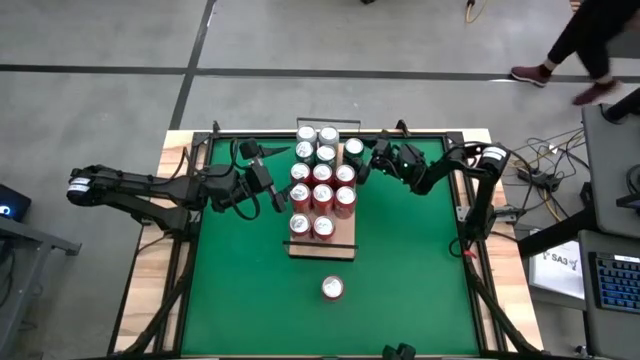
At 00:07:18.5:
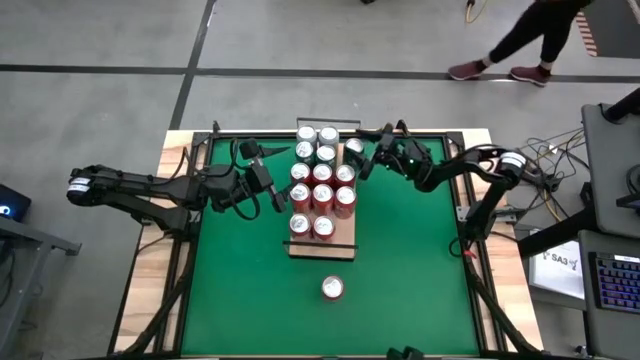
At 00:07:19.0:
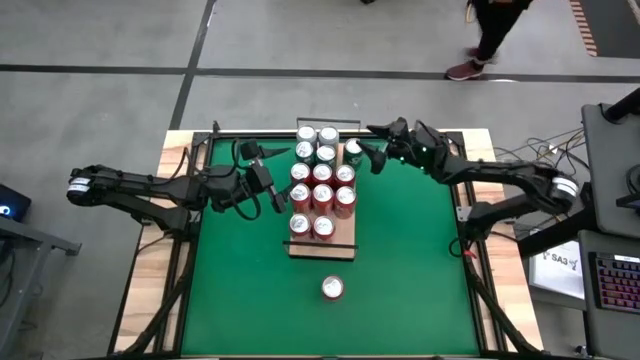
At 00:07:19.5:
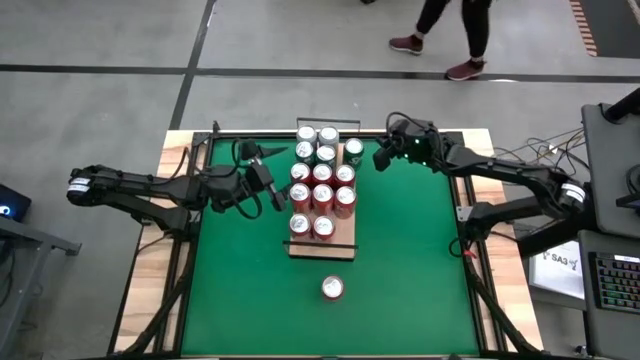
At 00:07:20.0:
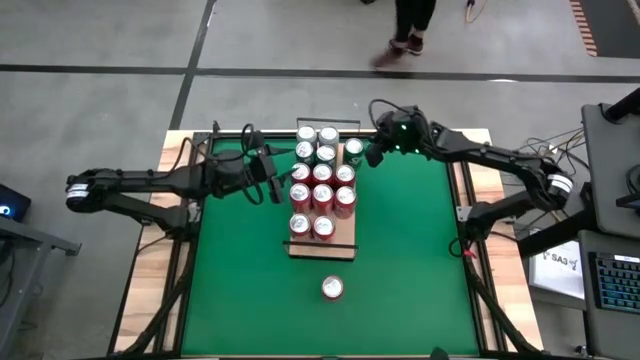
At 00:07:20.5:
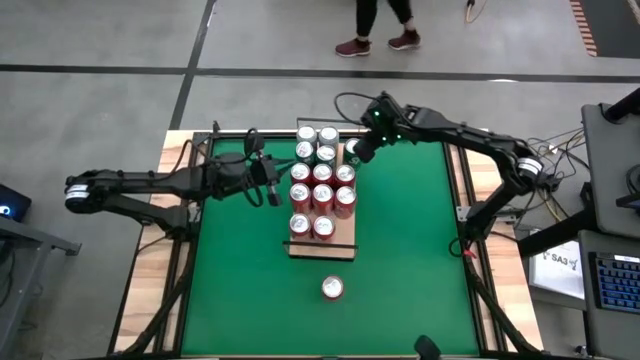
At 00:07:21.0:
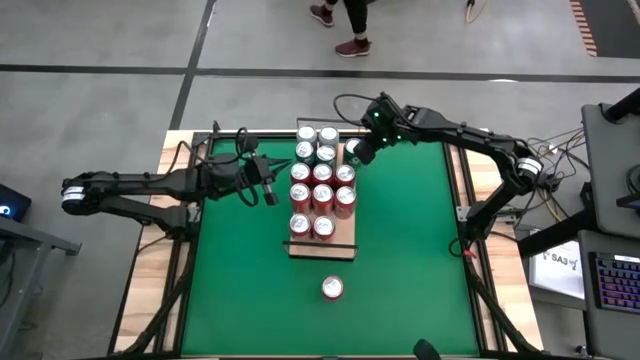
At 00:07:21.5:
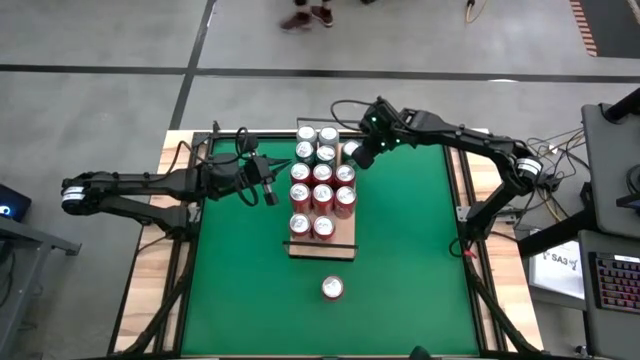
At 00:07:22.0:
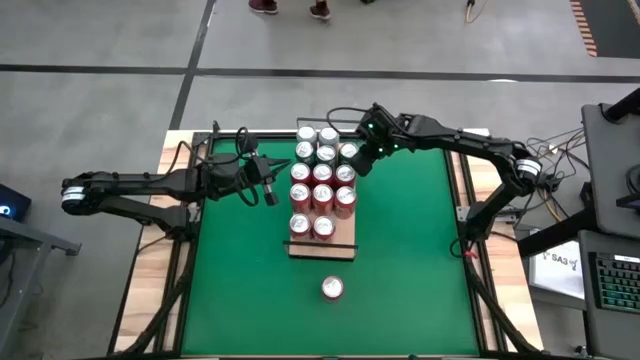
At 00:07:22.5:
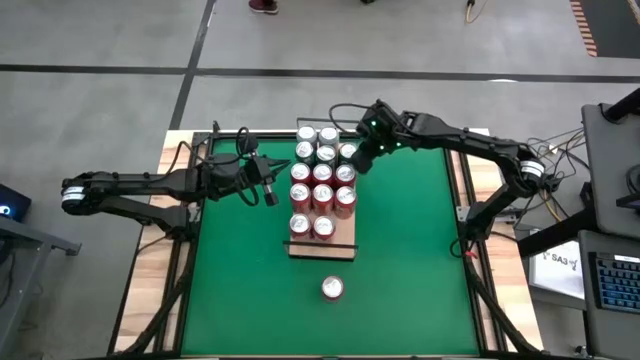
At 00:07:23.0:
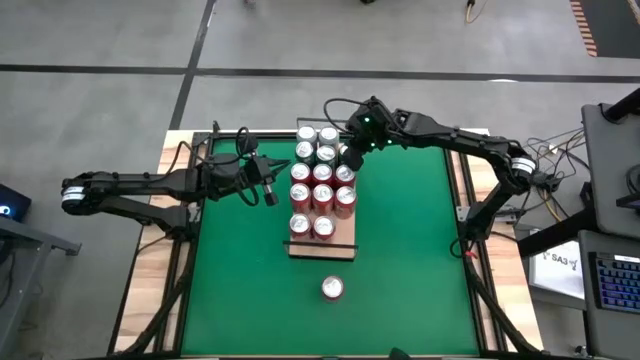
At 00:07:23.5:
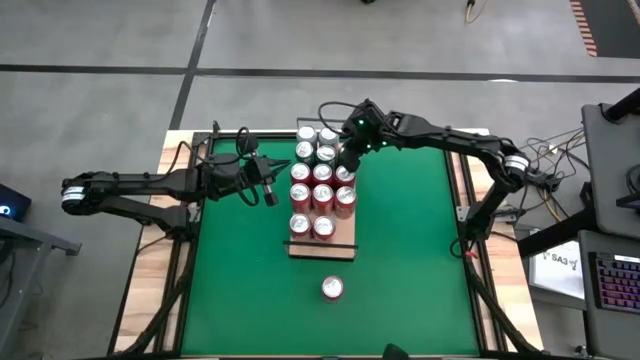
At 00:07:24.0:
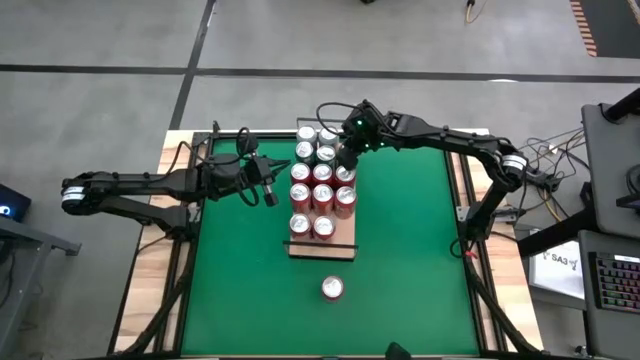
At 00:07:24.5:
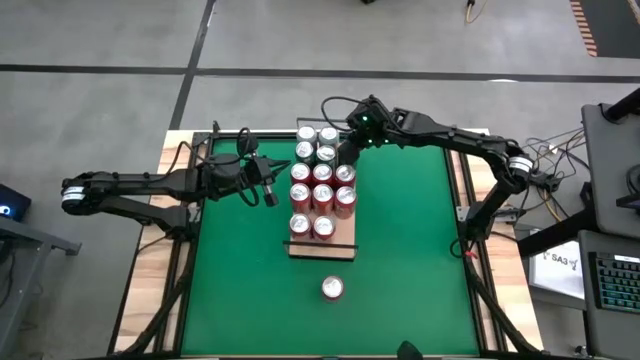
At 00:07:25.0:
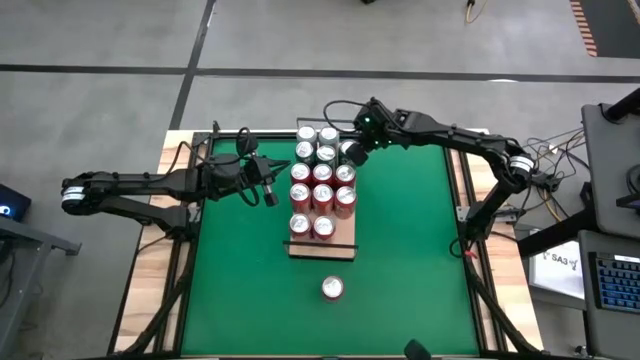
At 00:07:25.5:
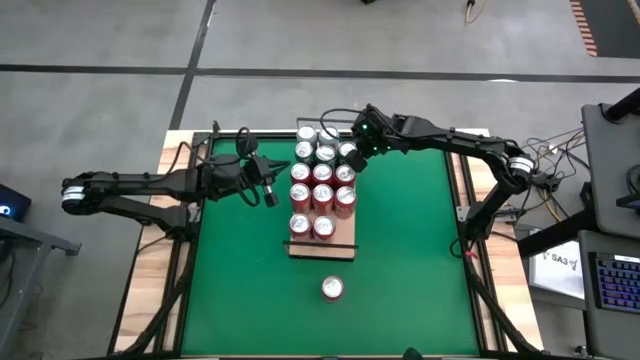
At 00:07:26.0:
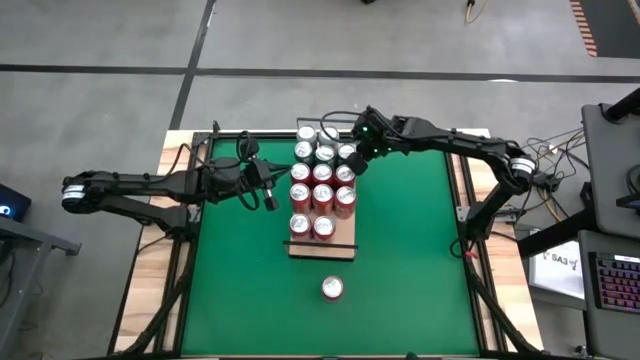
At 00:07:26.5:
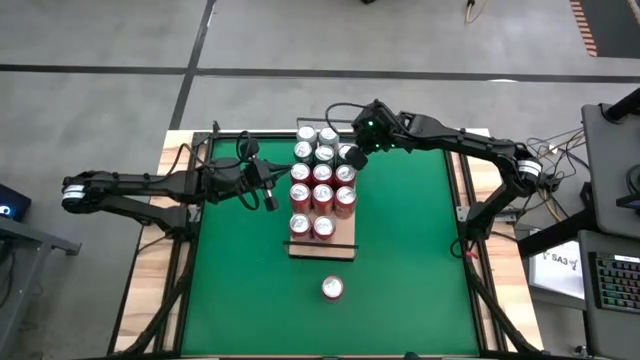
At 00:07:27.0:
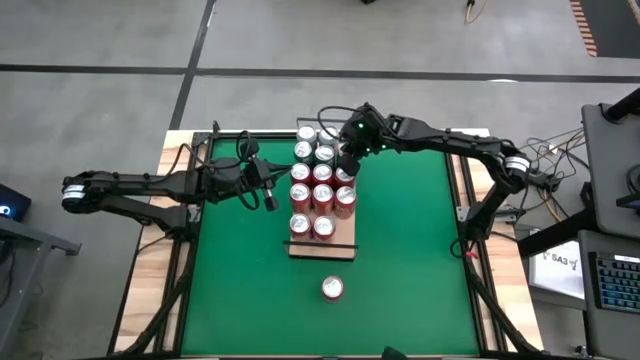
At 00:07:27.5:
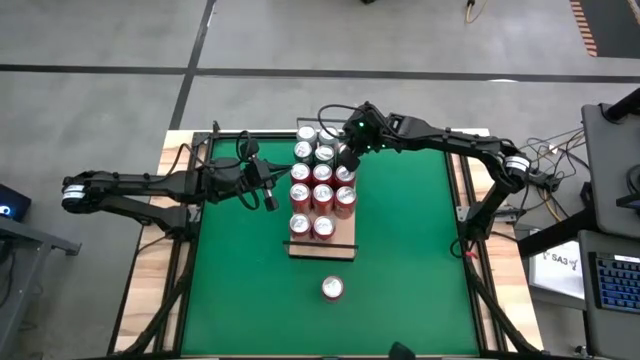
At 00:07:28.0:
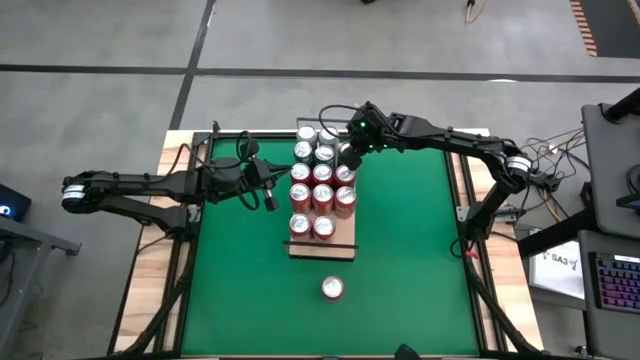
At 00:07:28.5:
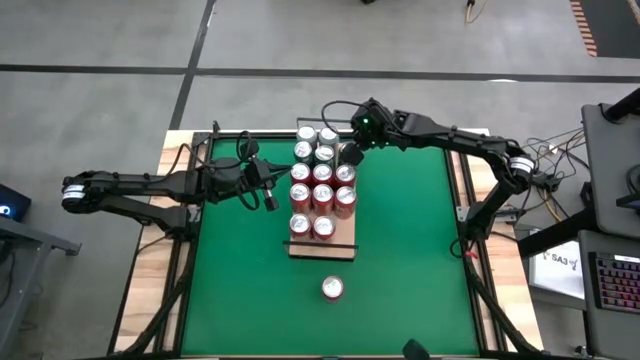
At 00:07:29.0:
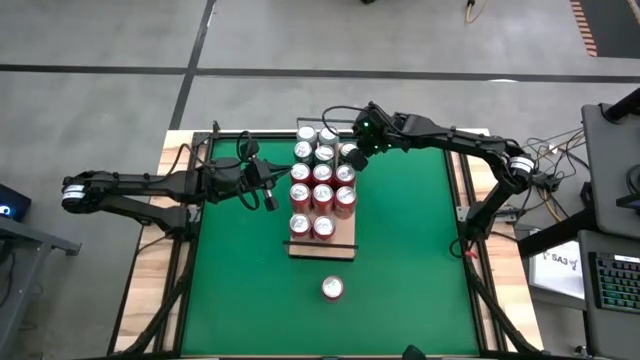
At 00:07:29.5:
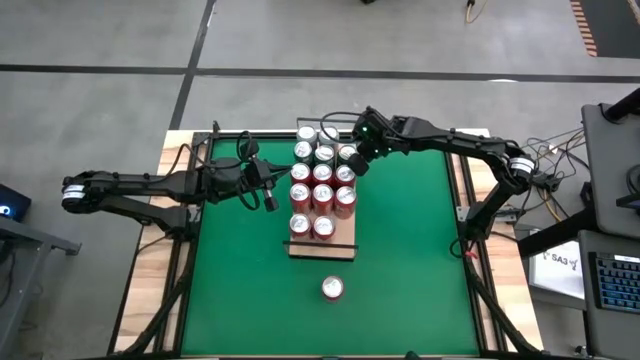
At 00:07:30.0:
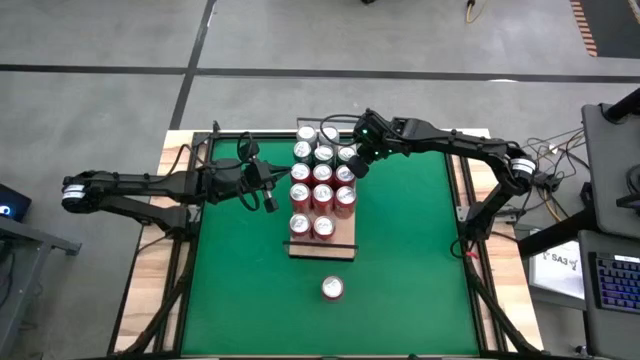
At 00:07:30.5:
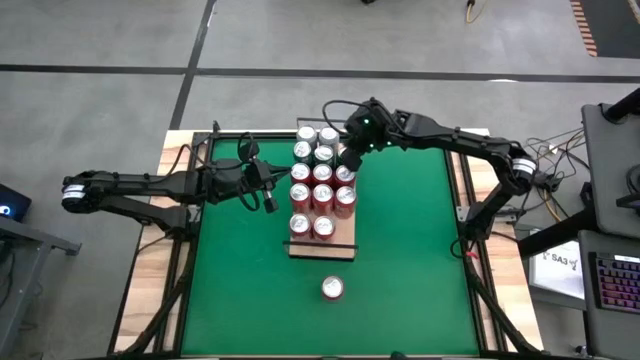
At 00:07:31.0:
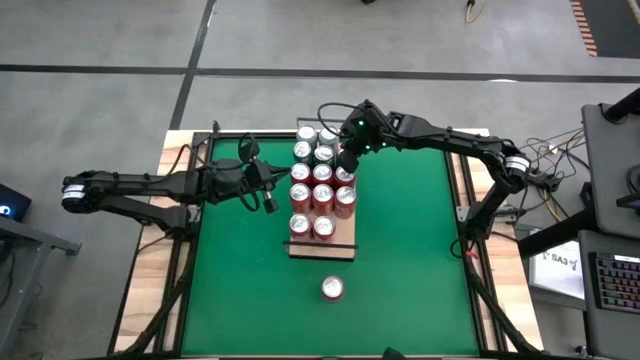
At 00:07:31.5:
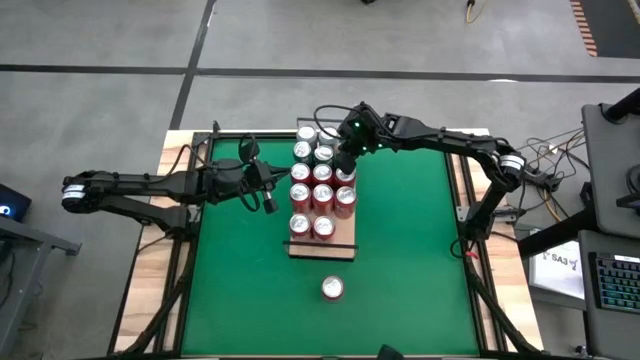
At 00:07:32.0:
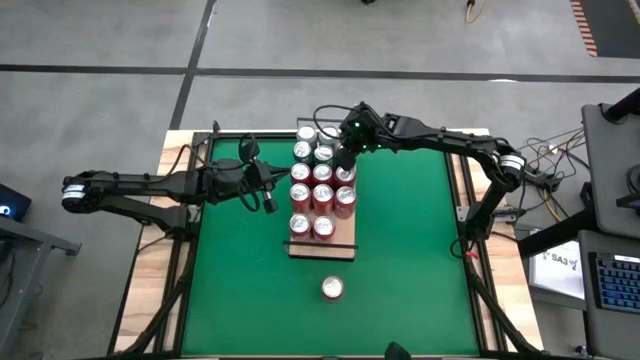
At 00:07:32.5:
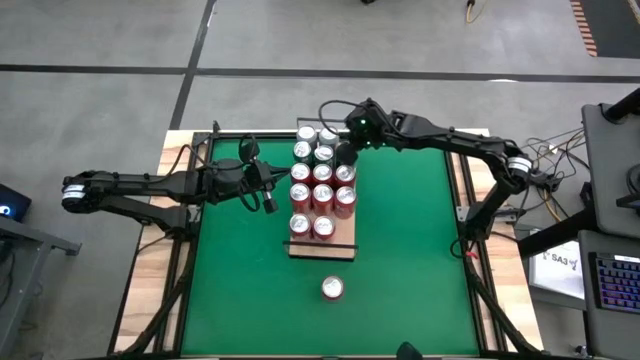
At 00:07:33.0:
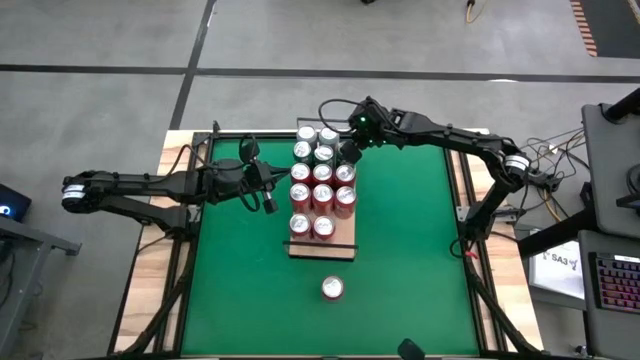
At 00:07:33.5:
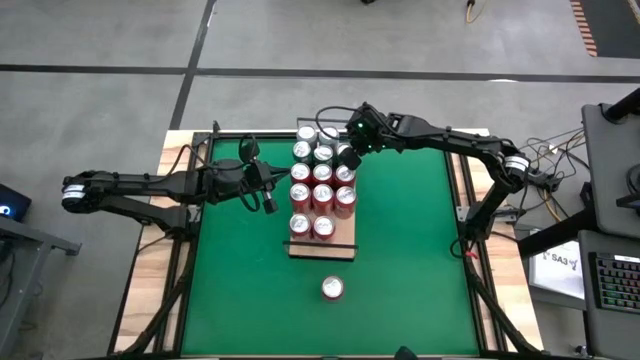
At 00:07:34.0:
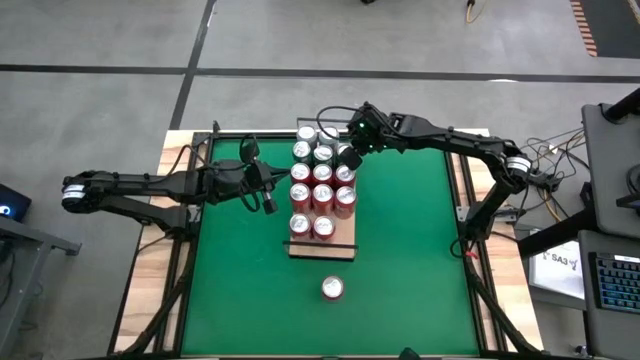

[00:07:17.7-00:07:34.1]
Task: Place canned beverage on shelf
Put the green soda can on the shelf and aligned with the other green soda can

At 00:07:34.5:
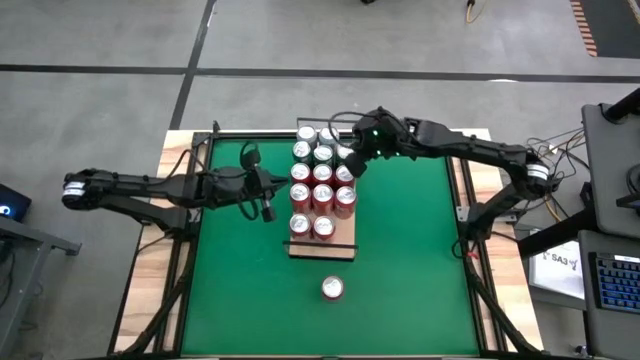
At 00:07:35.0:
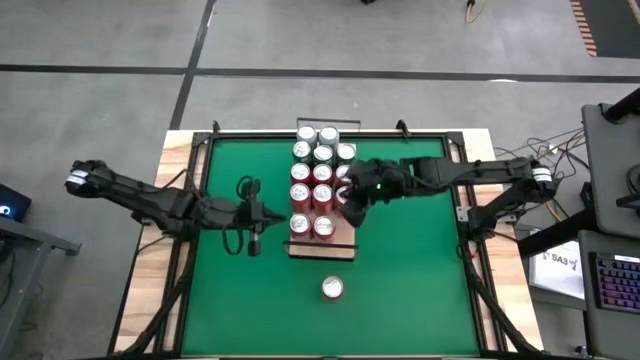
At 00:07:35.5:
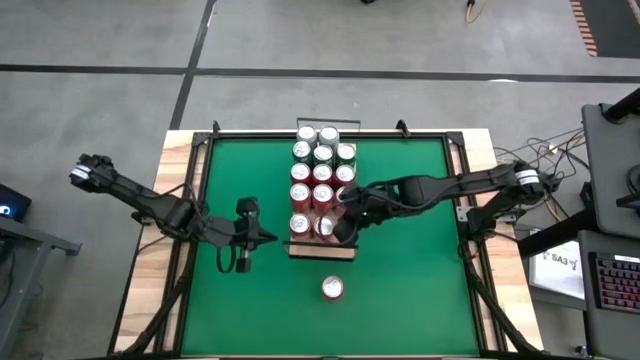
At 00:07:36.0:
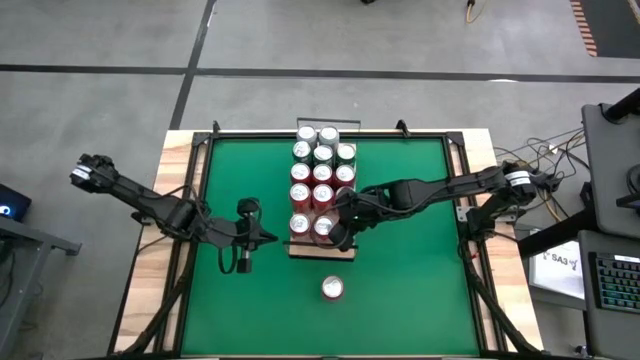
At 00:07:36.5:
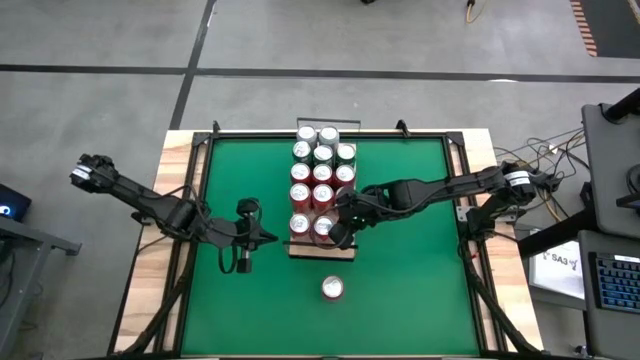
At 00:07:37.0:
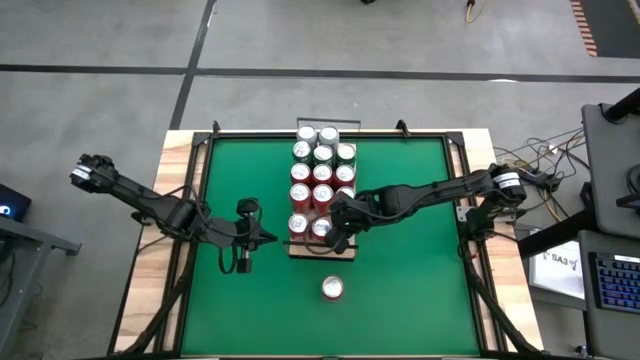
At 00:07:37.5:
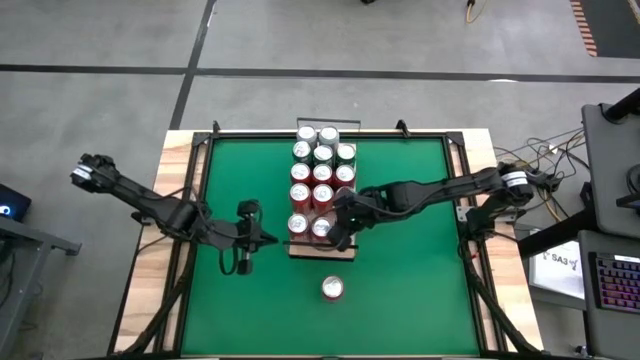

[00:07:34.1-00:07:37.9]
Adjust the orange soda cans
